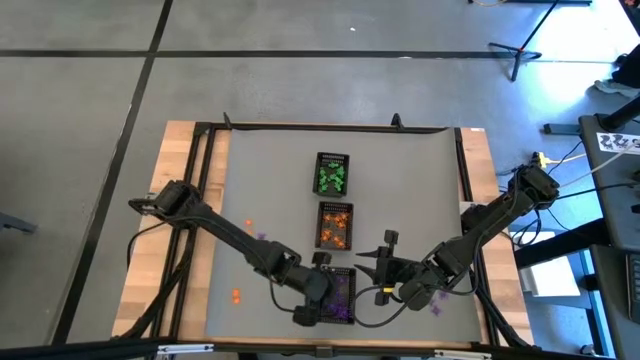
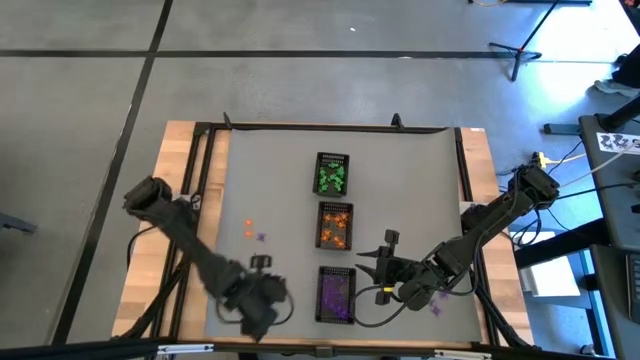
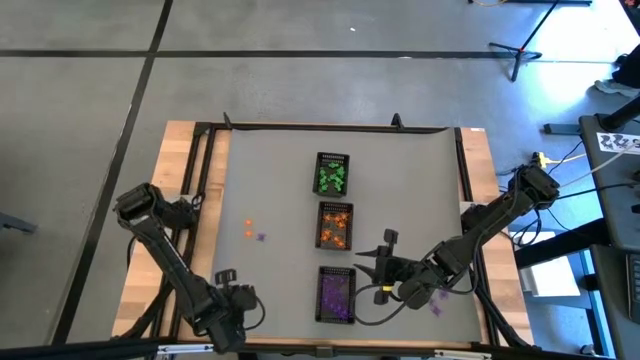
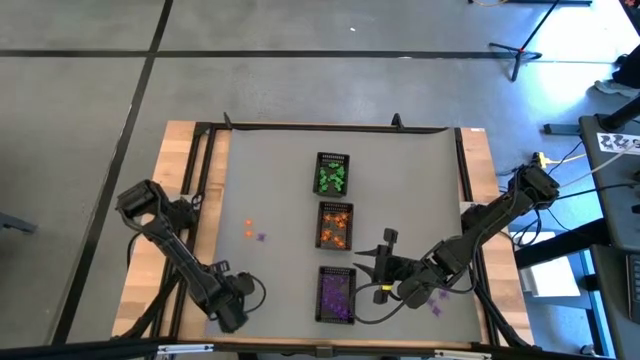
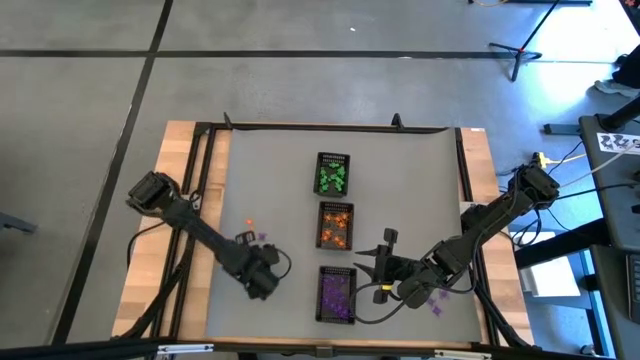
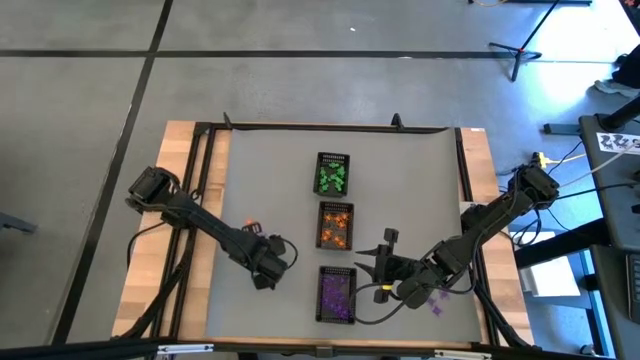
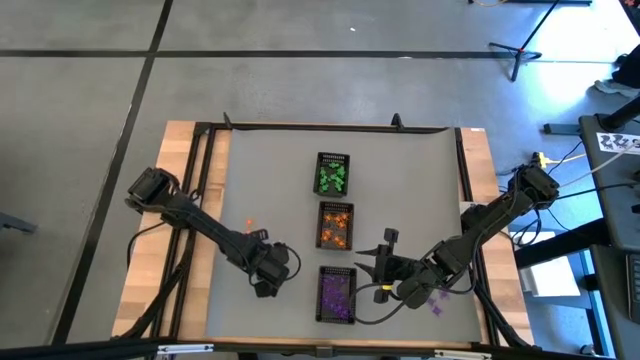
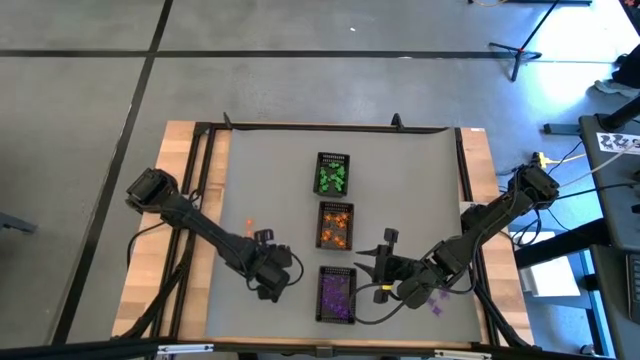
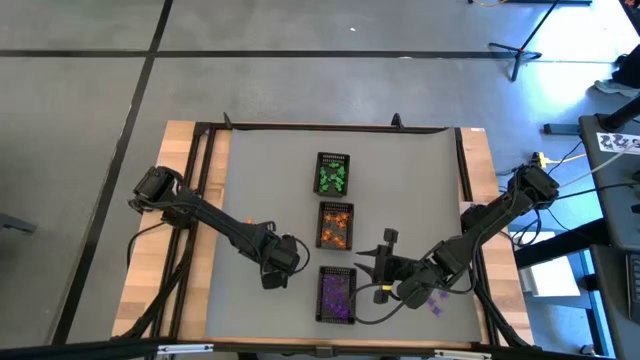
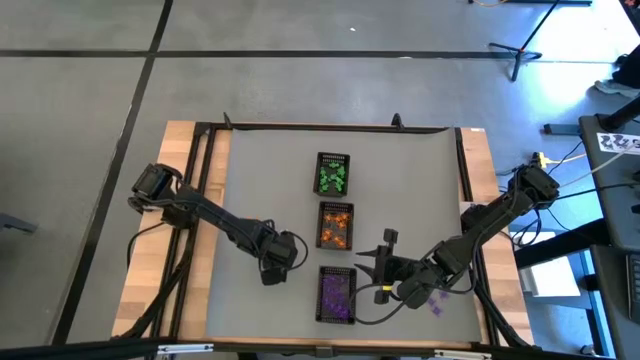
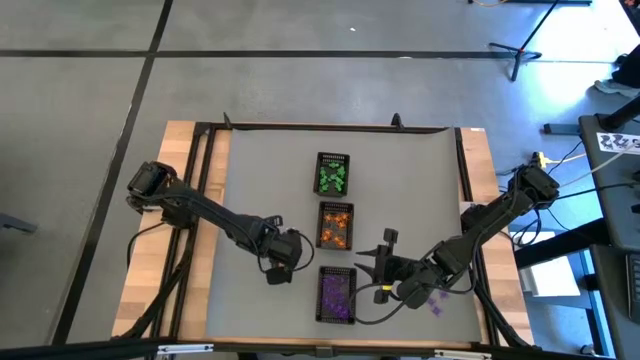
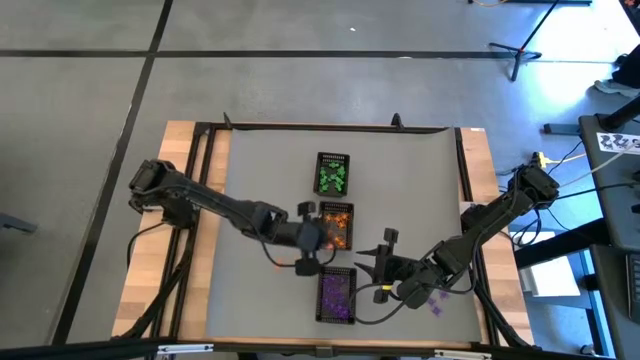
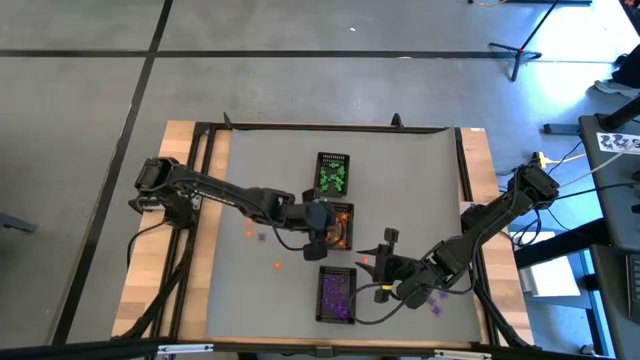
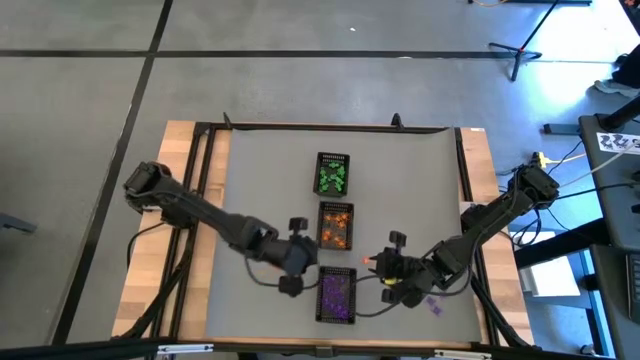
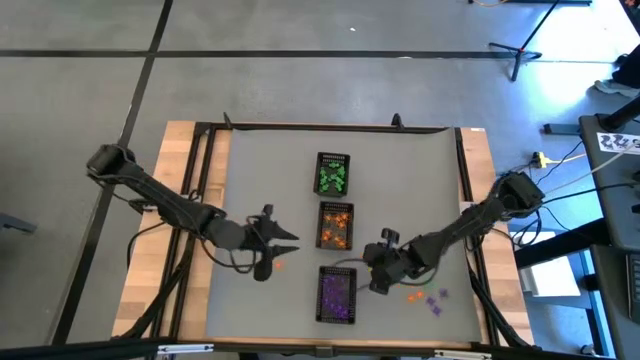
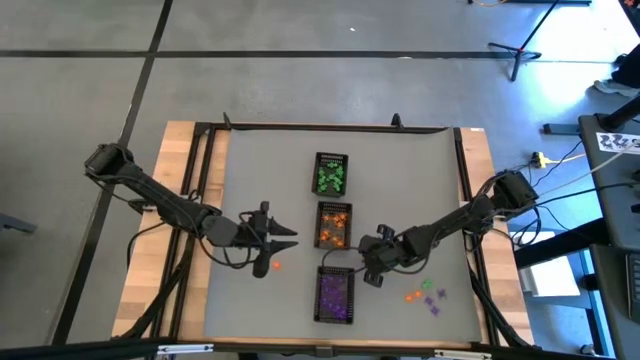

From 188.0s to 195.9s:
Task: Sort Halloween decoration
Put the orange spider toy into the middle black bin

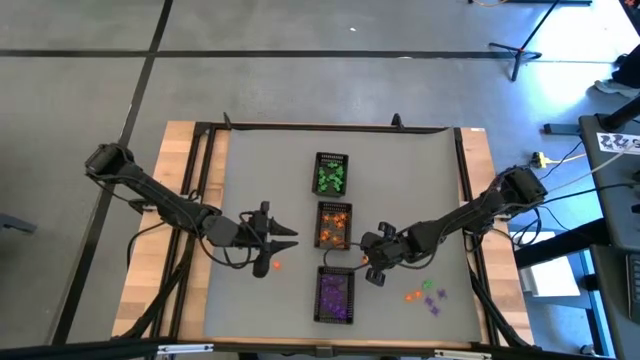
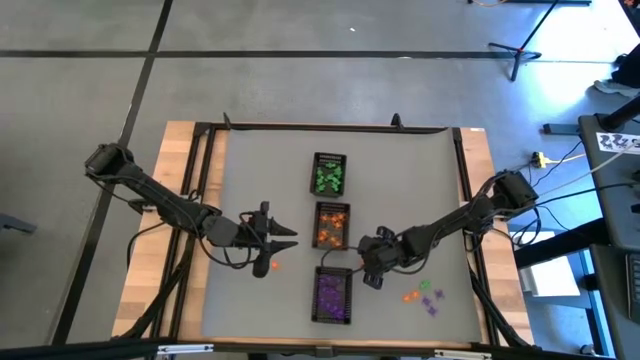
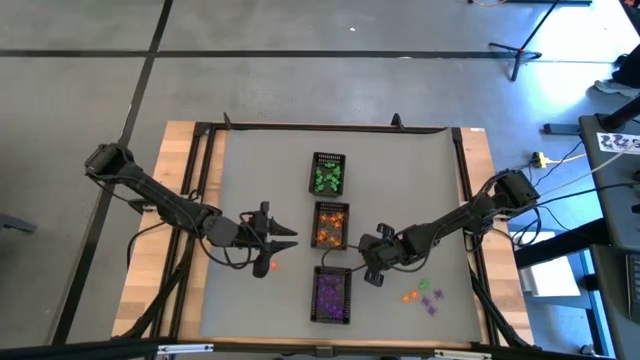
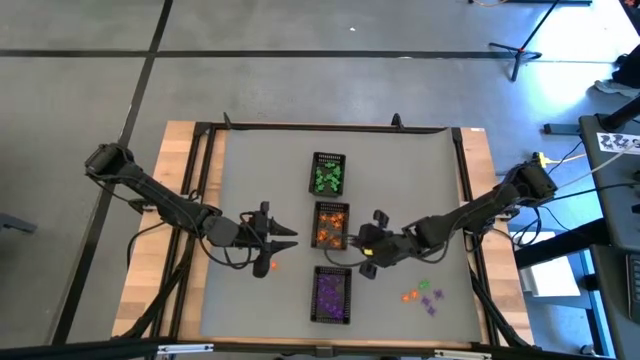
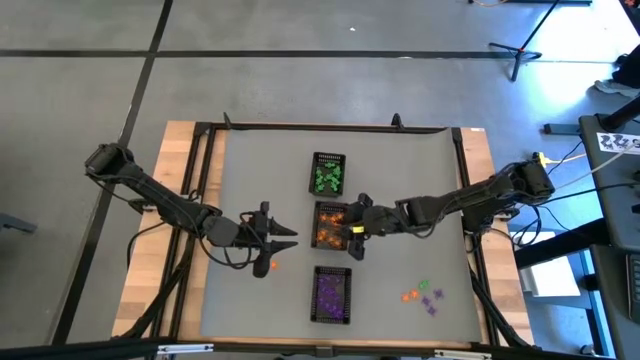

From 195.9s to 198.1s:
Put the orange spider toy into the middle black bin

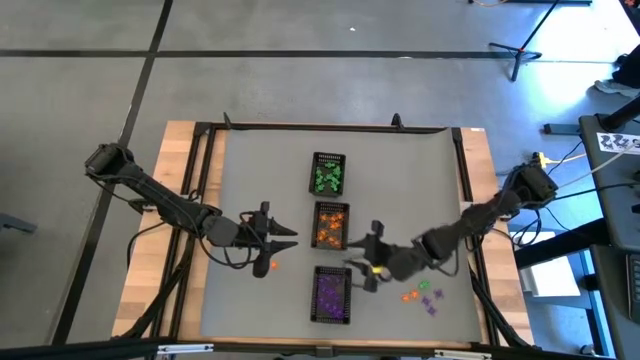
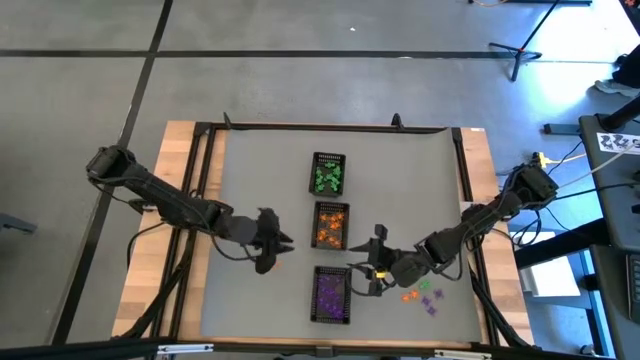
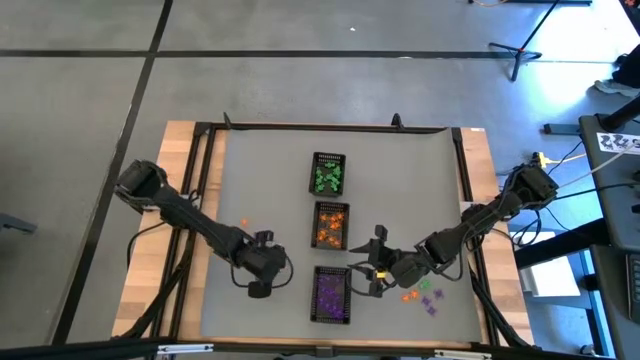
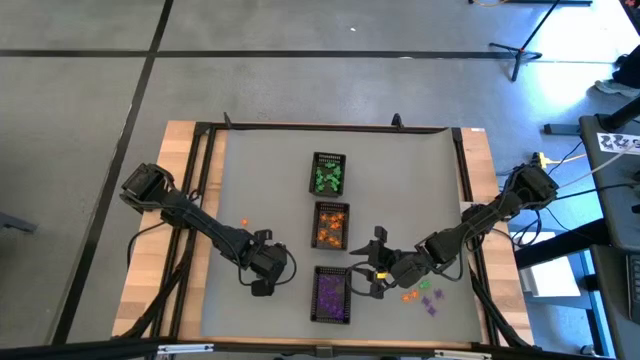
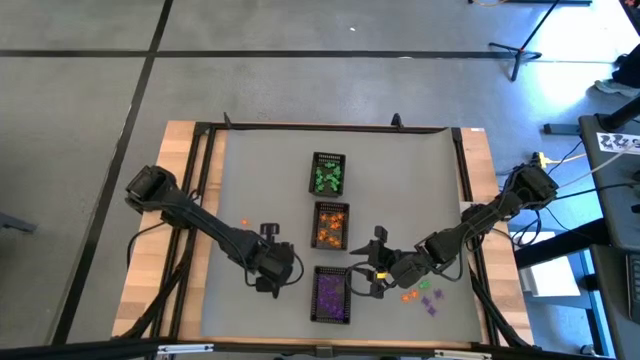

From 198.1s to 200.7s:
Put the orange spider toy into the middle black bin

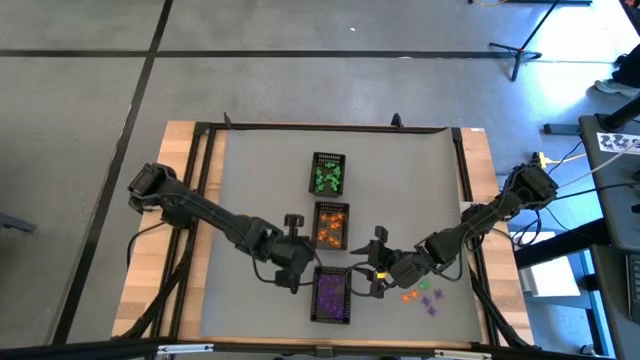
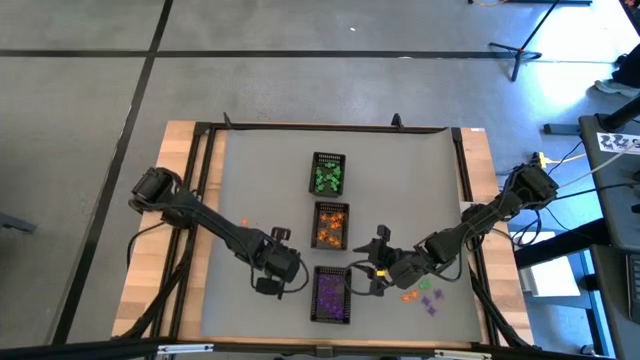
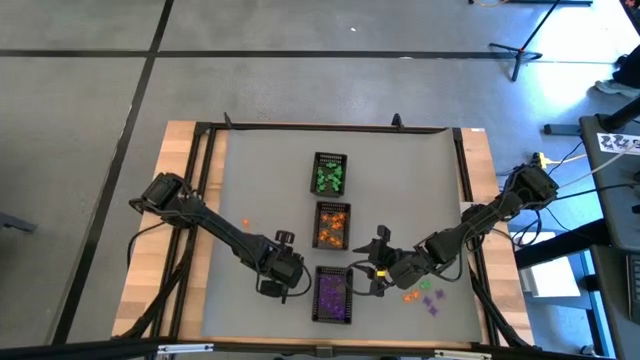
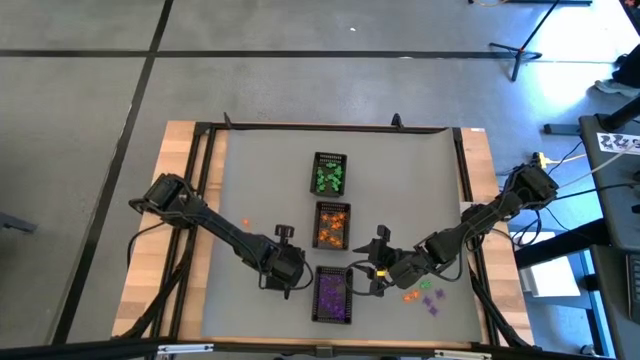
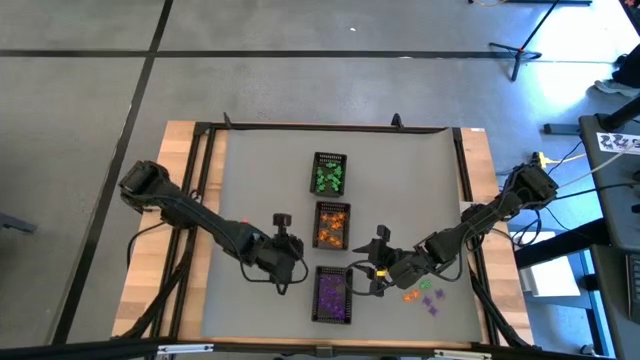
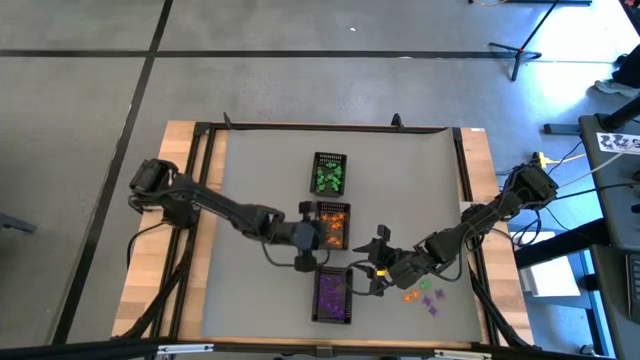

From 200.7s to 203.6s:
Put the orange spider toy into the middle black bin

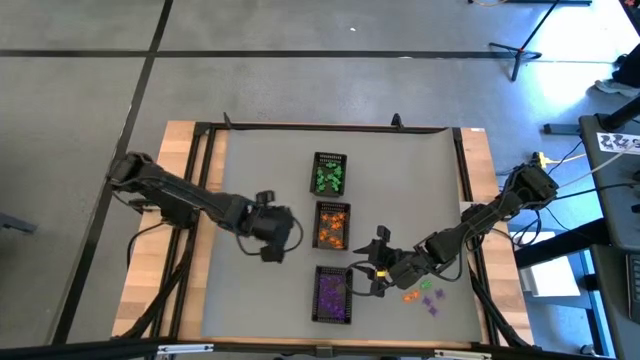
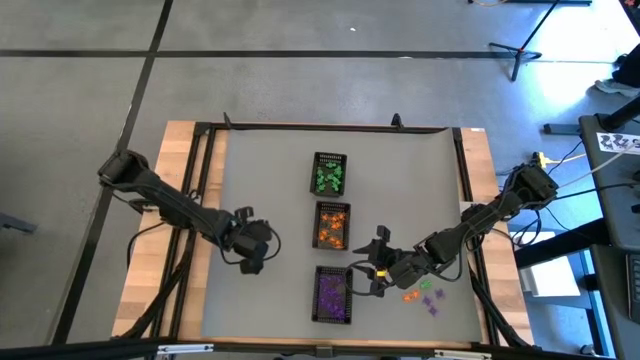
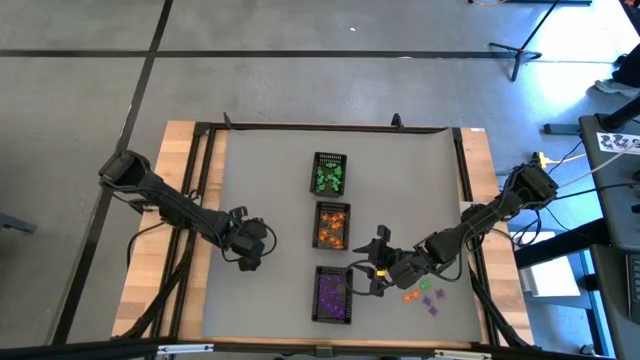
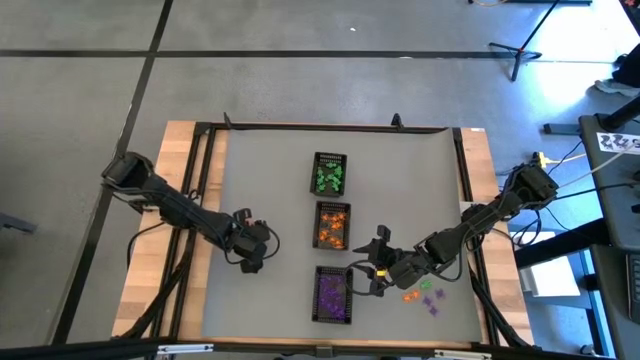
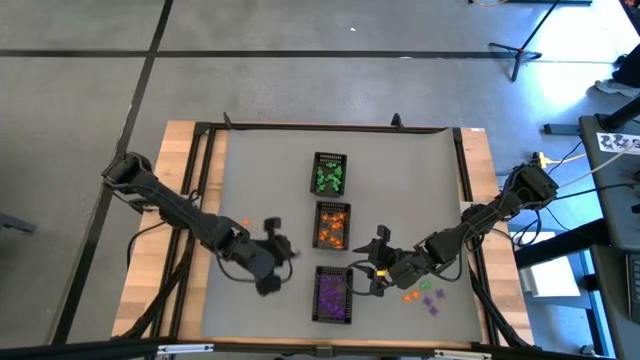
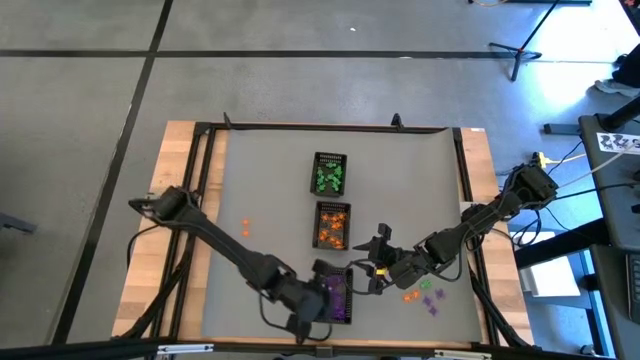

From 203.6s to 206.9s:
Put the violet spider toy into the bottom black bin

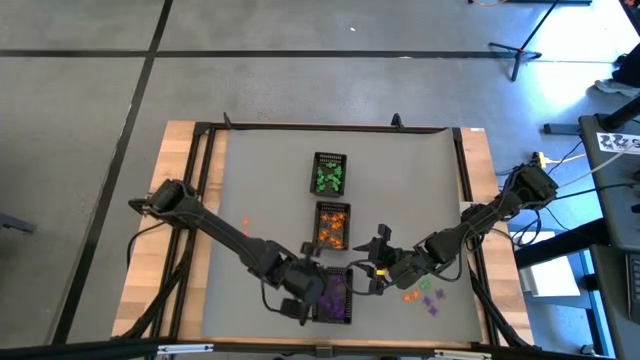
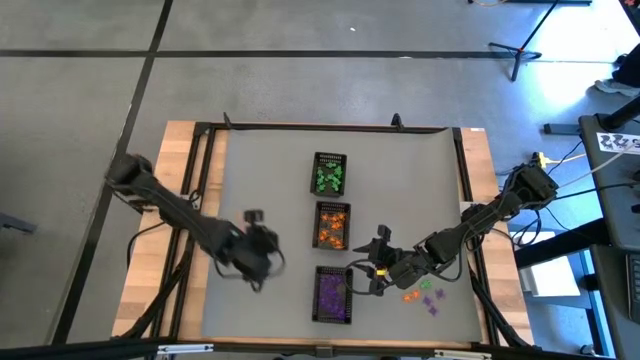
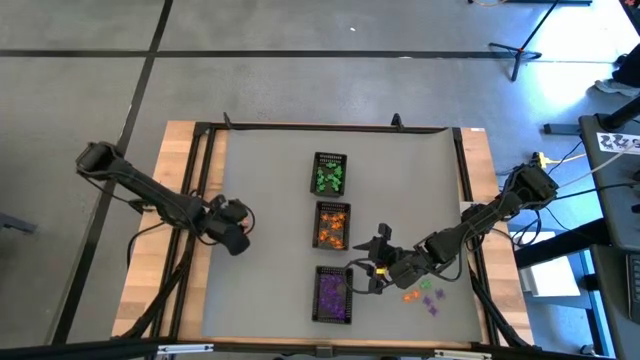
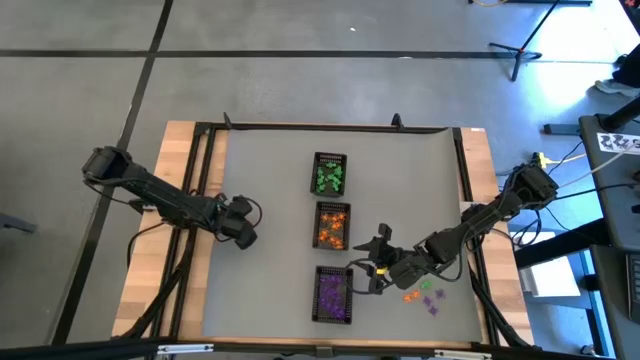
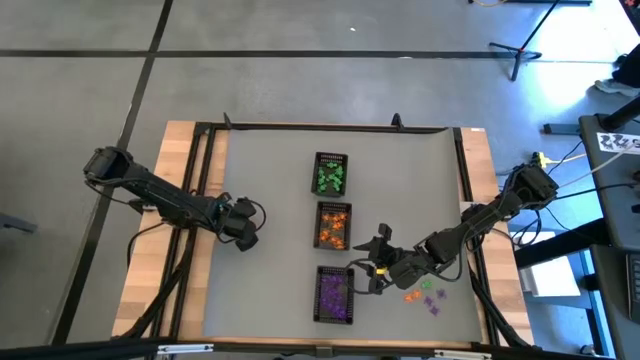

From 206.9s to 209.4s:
Put the orange spider toy into the middle black bin

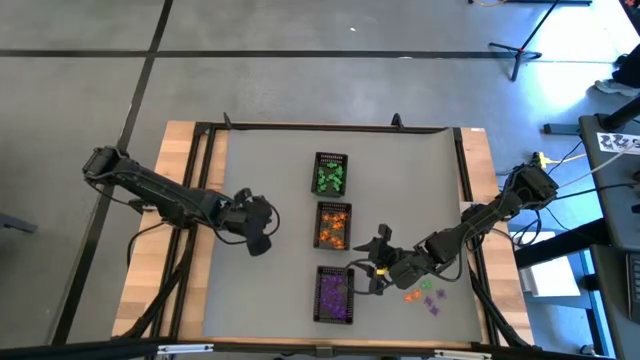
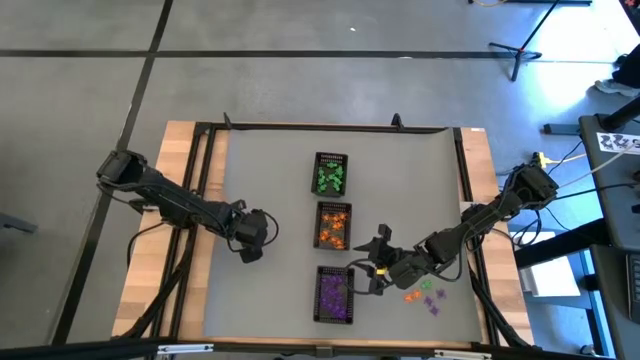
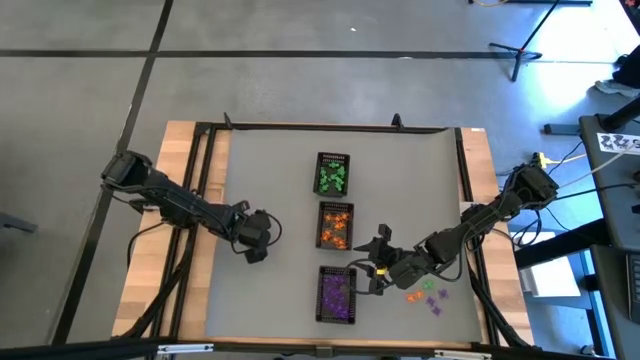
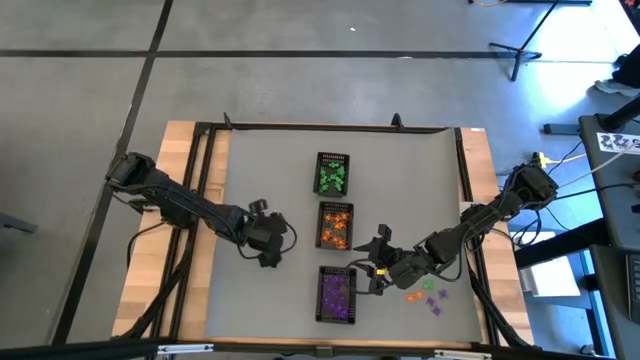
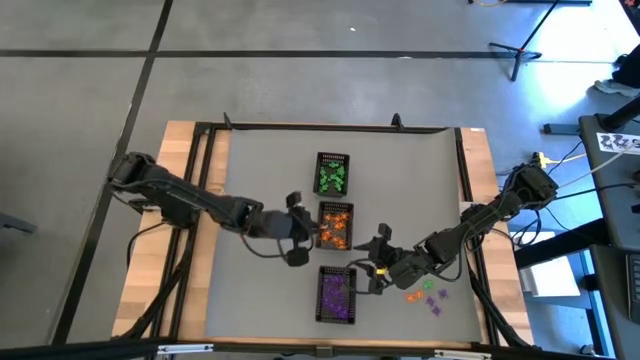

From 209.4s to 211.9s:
Put the orange spider toy into the middle black bin
